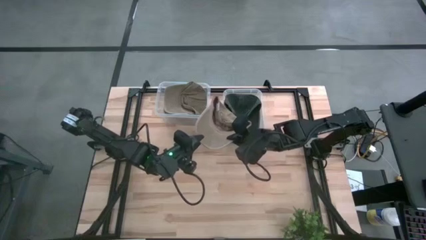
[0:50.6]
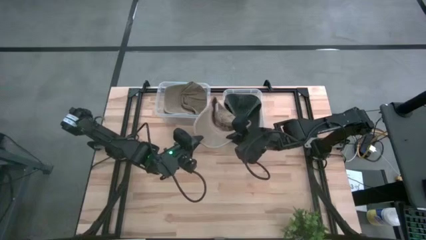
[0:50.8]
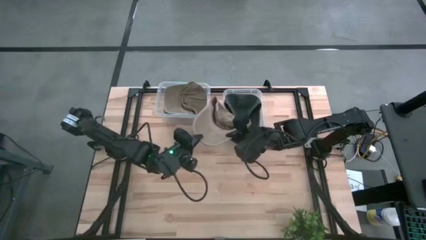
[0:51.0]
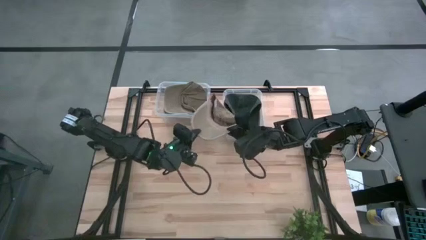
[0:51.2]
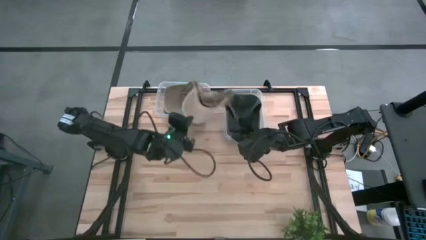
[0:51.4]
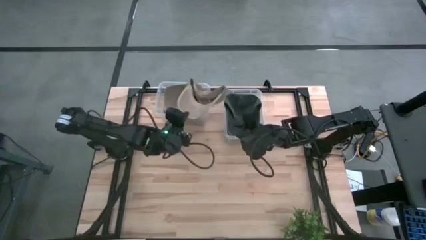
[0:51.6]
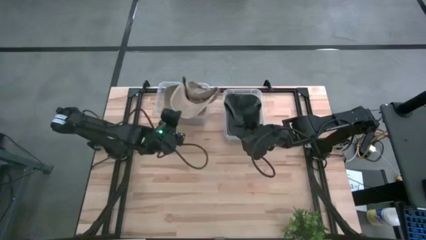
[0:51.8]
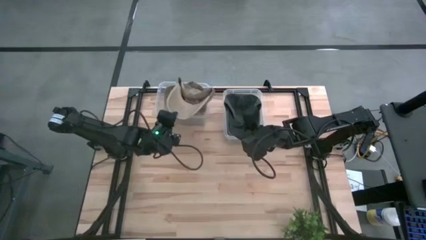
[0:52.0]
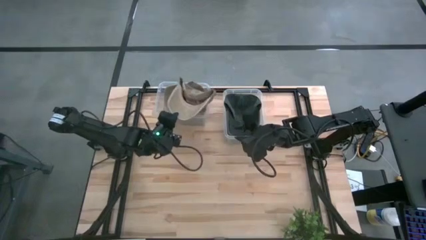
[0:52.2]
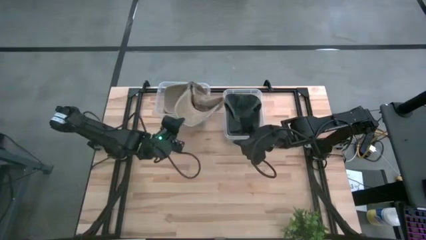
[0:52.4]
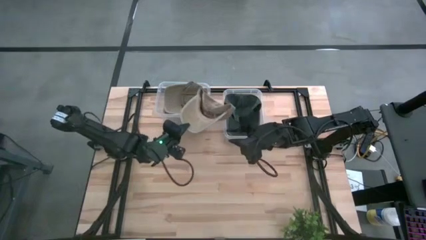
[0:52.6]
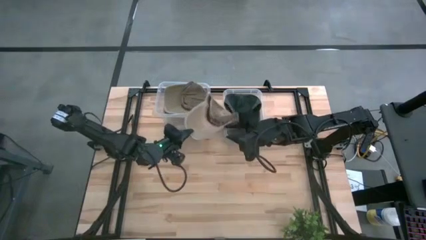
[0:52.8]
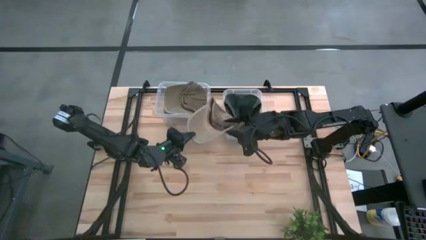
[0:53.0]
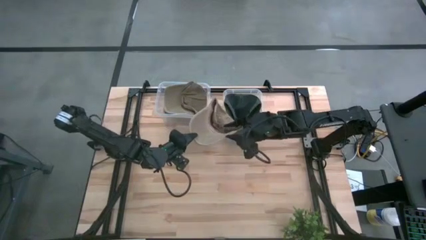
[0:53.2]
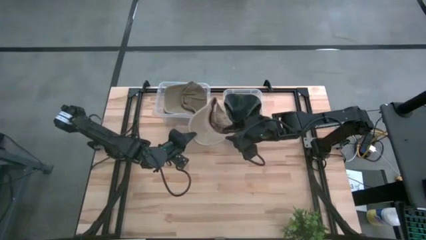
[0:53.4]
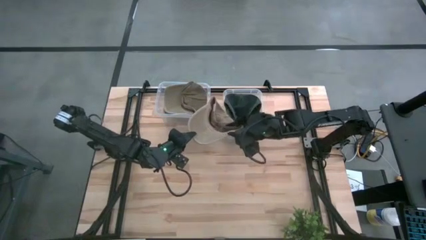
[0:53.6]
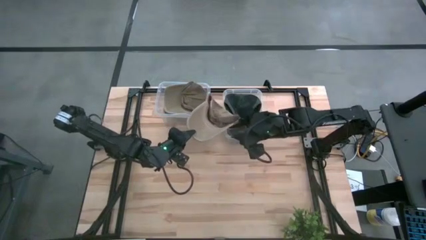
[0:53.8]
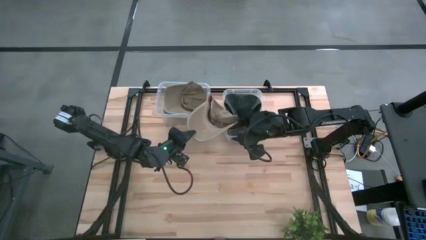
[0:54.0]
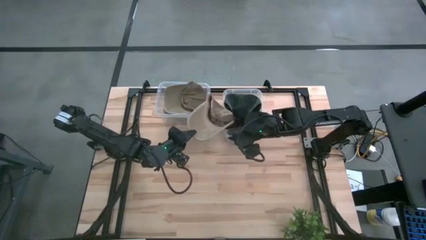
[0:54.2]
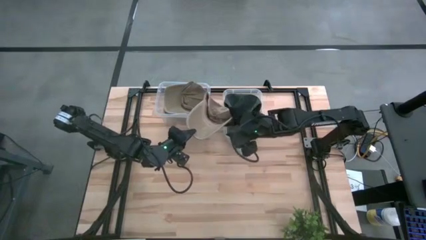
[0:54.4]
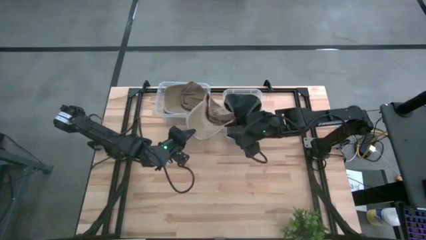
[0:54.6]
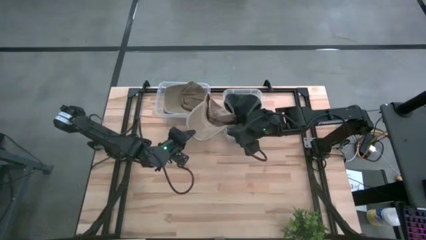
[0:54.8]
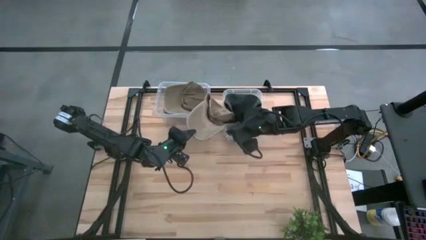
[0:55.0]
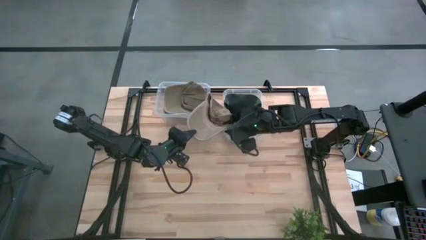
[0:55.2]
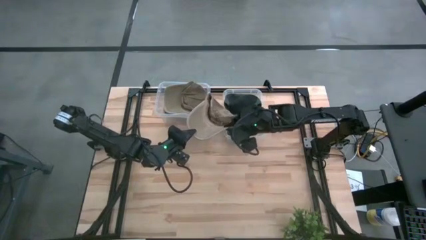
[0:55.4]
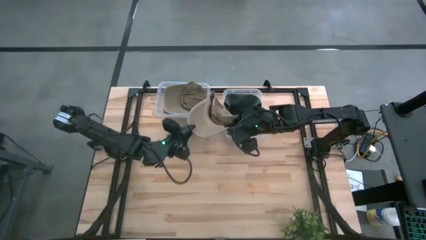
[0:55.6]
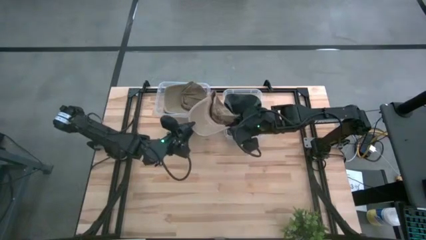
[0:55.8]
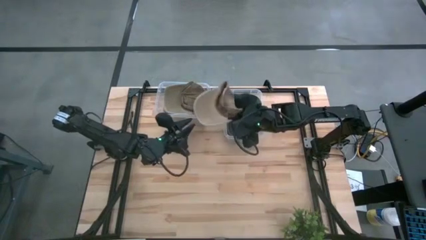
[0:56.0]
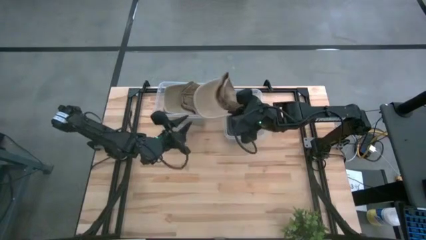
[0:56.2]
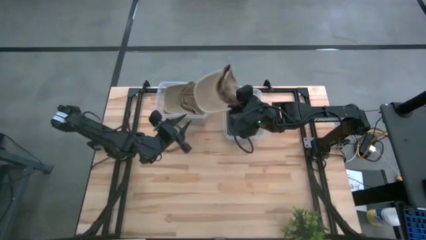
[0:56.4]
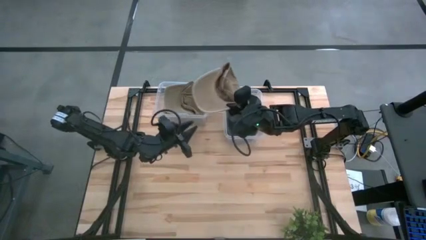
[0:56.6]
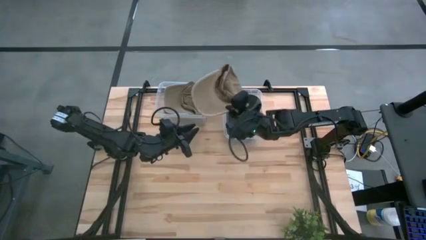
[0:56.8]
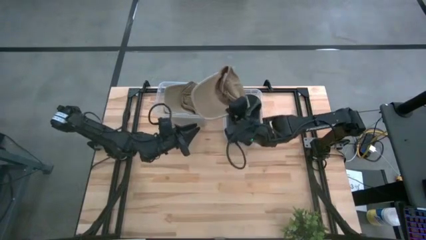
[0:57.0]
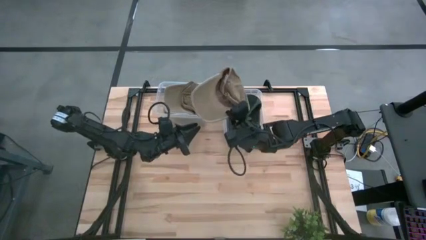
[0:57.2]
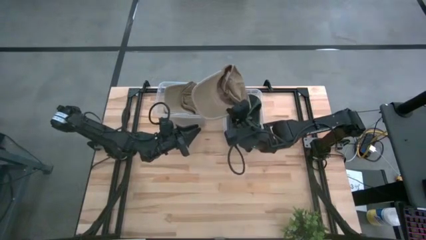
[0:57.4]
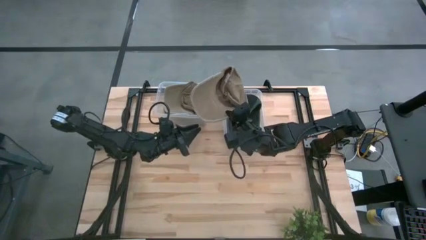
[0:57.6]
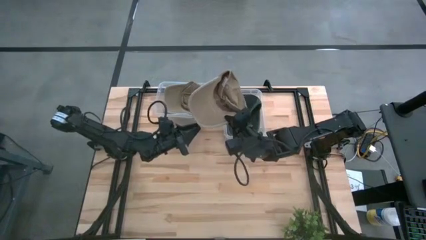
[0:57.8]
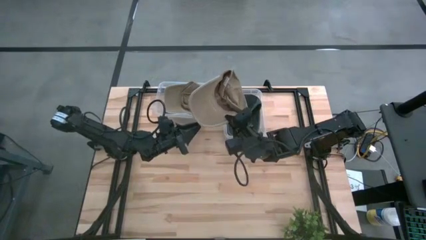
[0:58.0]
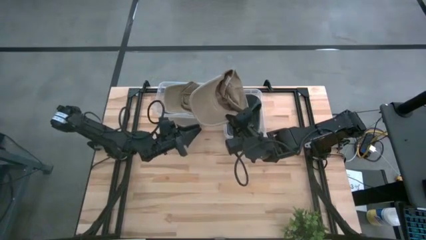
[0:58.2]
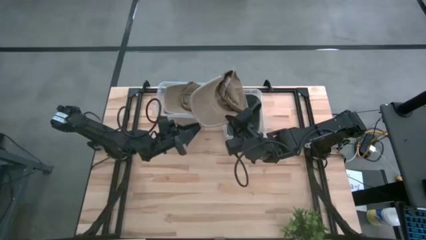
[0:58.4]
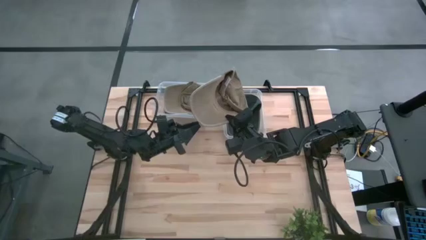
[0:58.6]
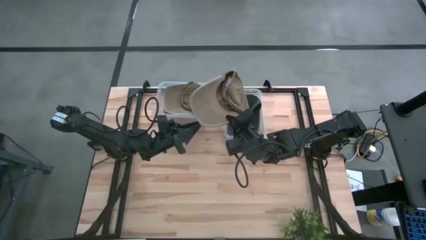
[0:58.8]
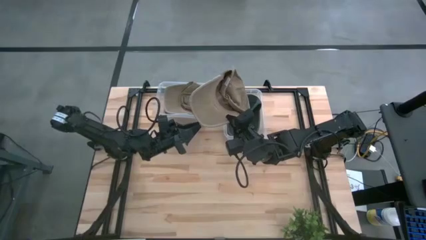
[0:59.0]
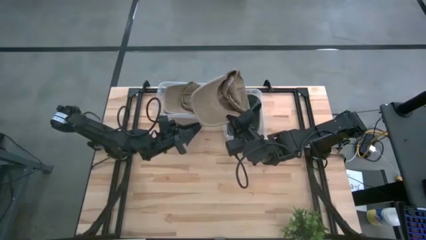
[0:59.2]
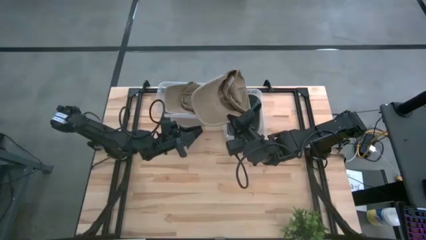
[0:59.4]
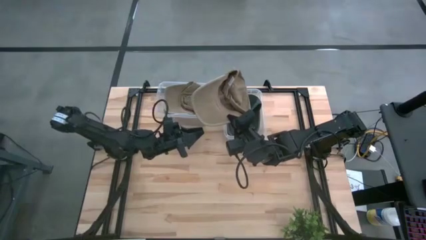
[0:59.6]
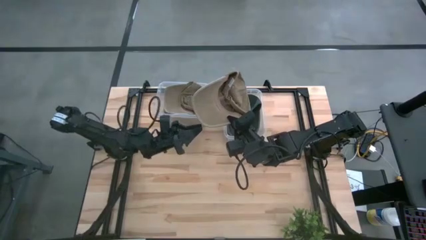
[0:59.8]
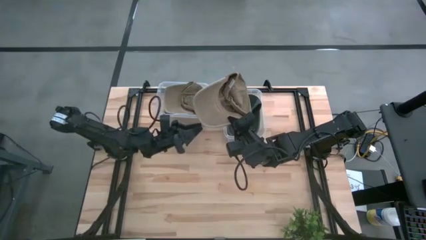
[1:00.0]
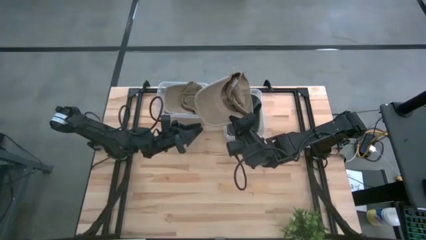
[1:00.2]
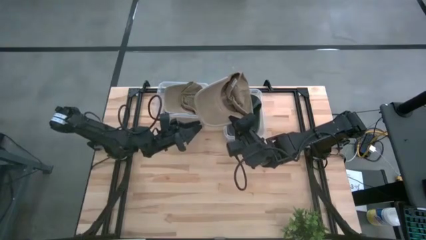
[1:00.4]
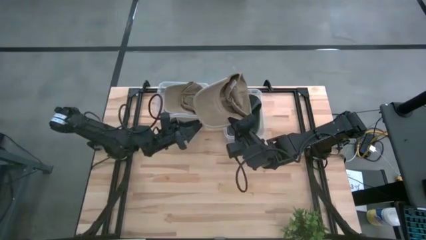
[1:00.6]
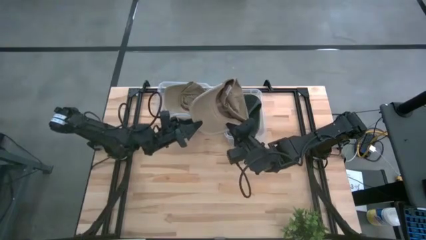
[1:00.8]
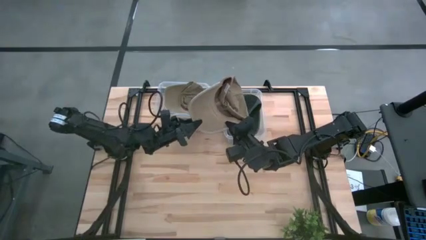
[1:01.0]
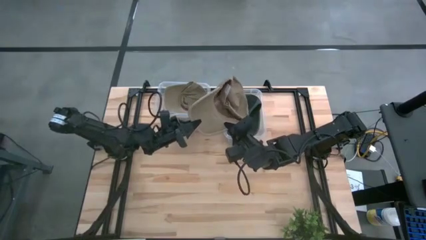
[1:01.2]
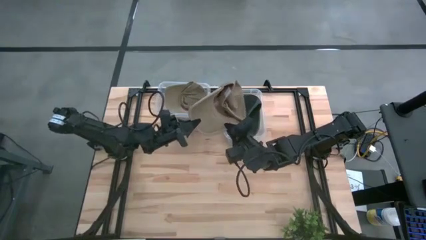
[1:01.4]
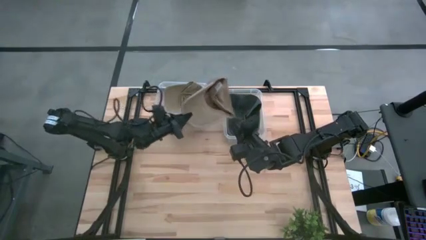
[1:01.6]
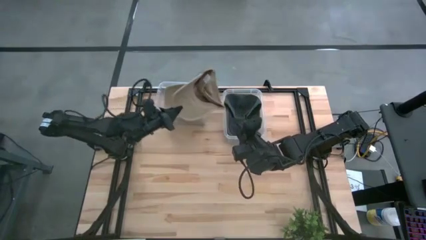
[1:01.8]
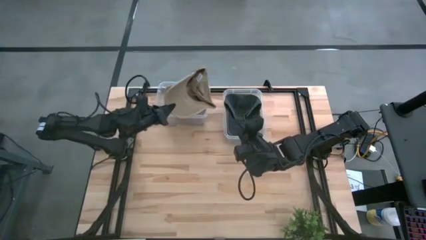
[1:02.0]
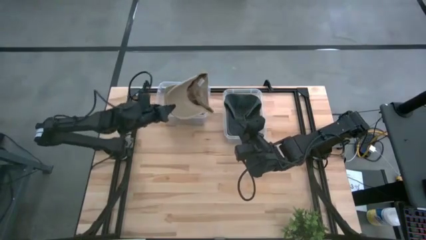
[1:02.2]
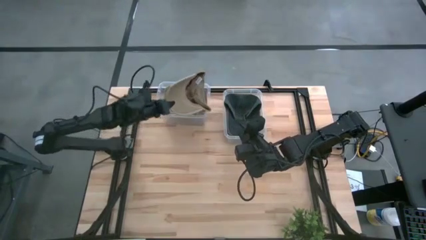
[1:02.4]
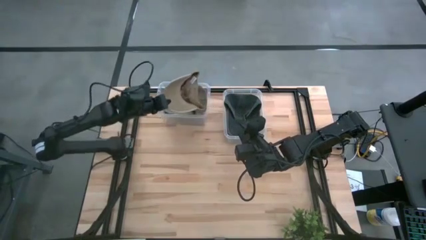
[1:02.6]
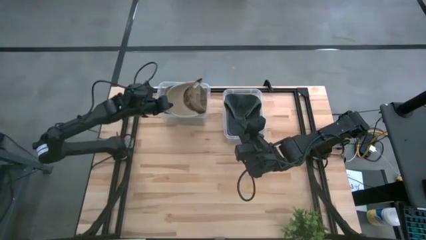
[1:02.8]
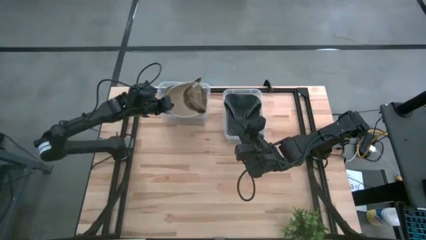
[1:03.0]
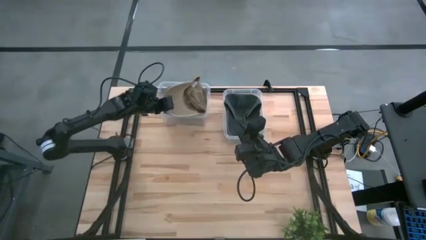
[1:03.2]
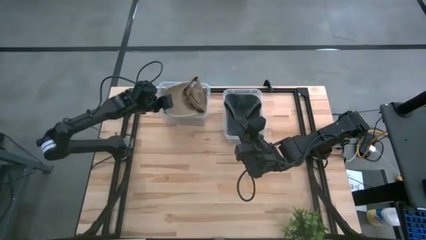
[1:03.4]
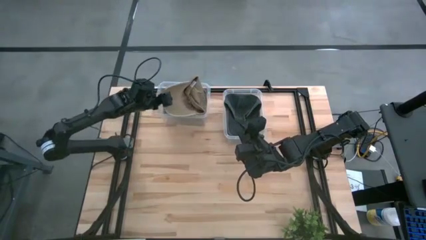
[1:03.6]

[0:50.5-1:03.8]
Task: Pick & Place hat
Put the light brown cap into the left transparent bin
